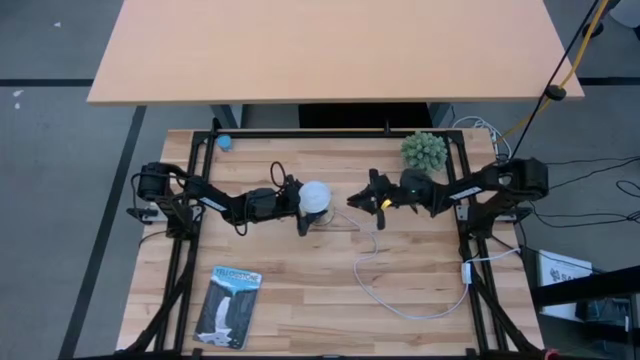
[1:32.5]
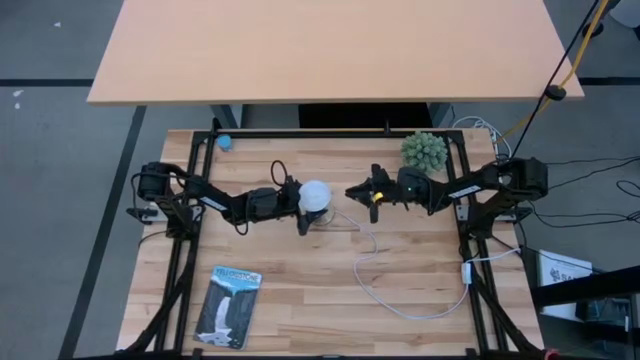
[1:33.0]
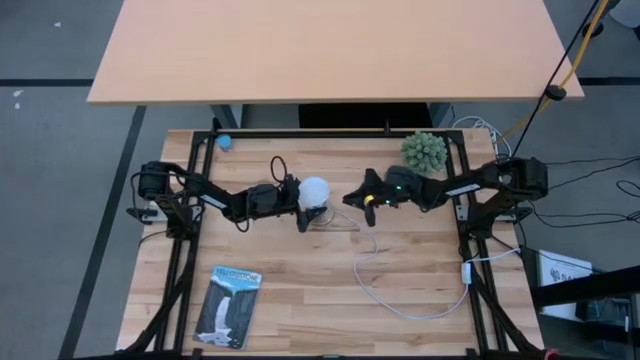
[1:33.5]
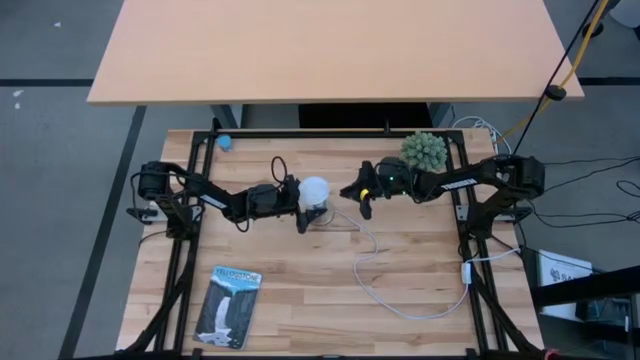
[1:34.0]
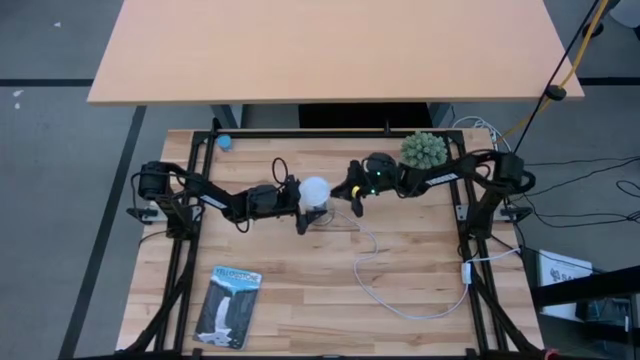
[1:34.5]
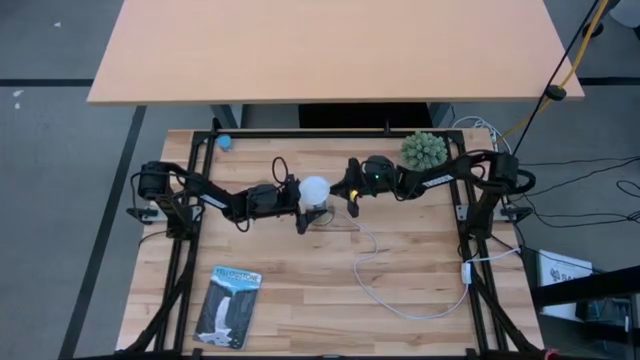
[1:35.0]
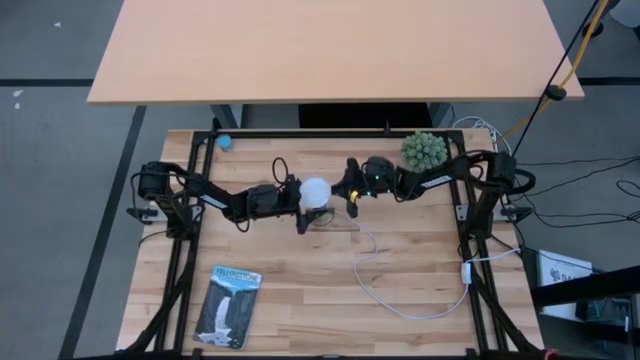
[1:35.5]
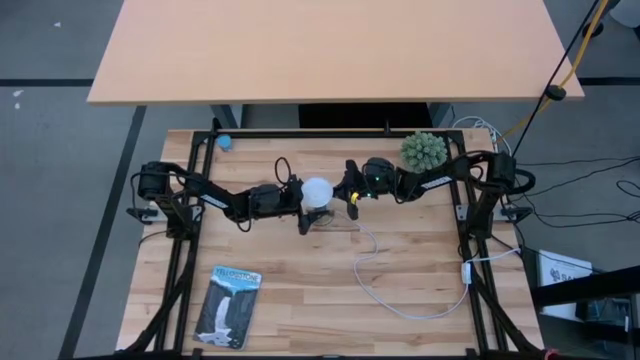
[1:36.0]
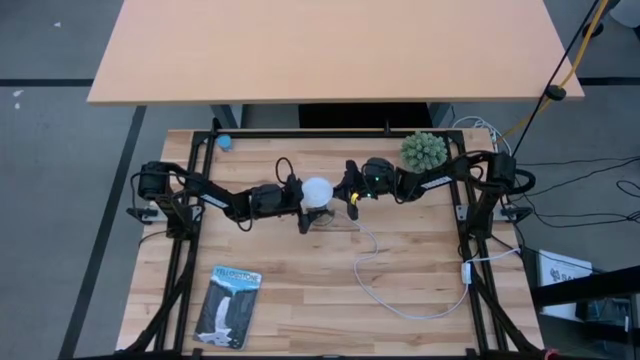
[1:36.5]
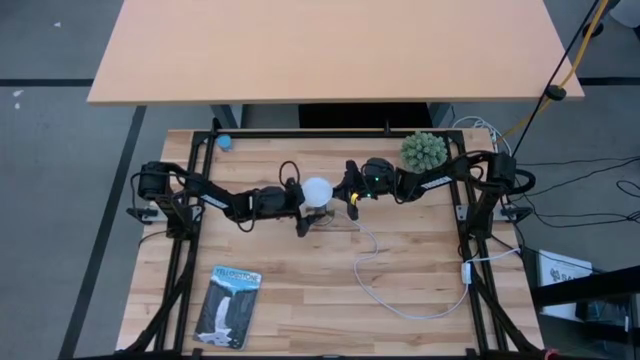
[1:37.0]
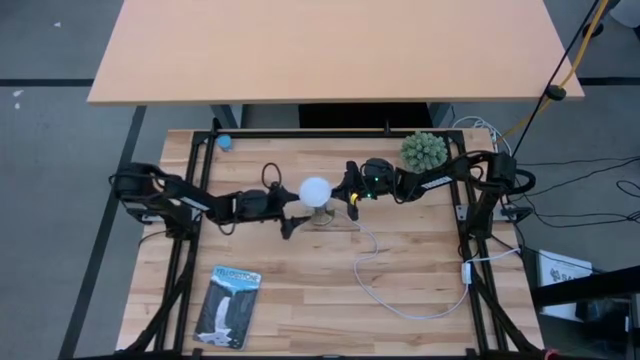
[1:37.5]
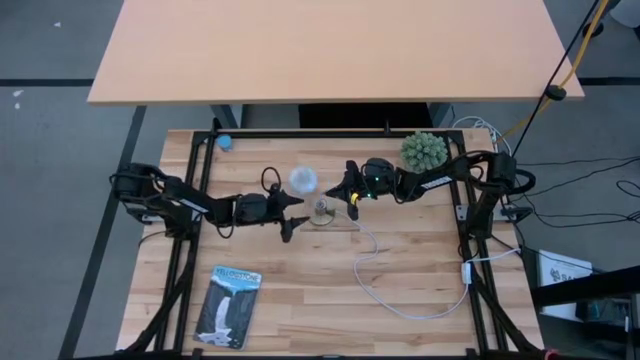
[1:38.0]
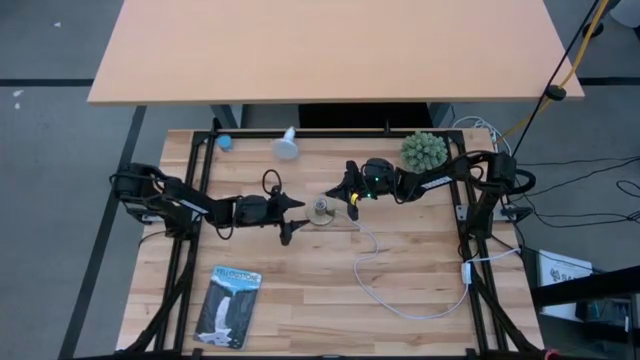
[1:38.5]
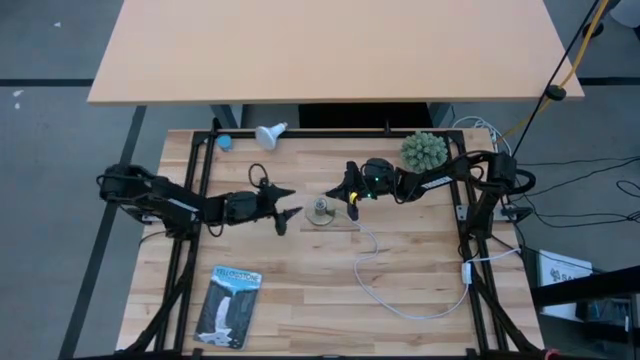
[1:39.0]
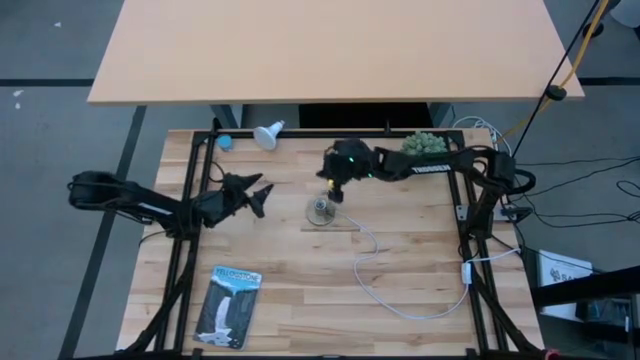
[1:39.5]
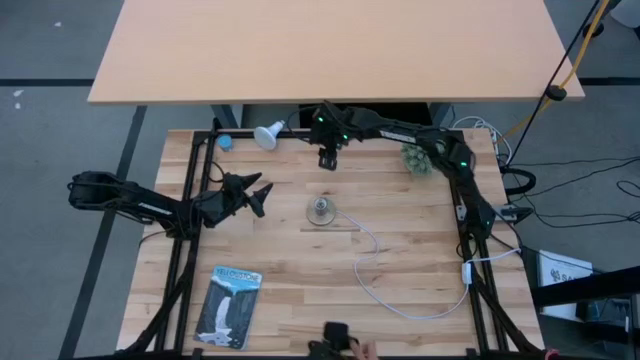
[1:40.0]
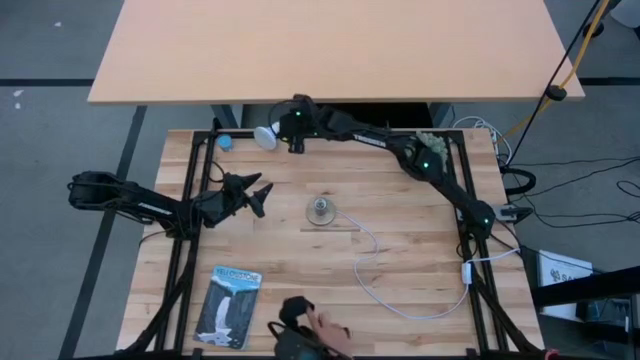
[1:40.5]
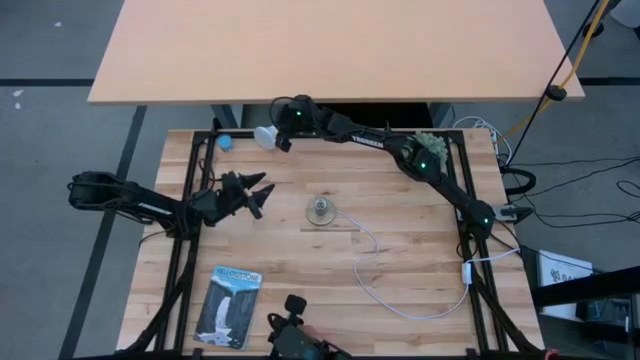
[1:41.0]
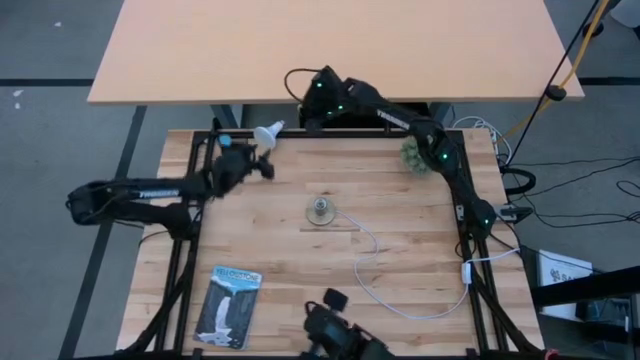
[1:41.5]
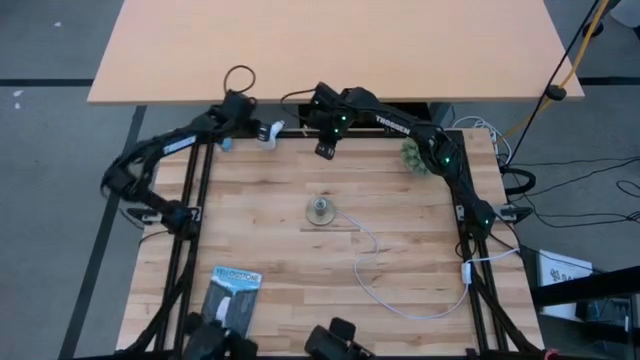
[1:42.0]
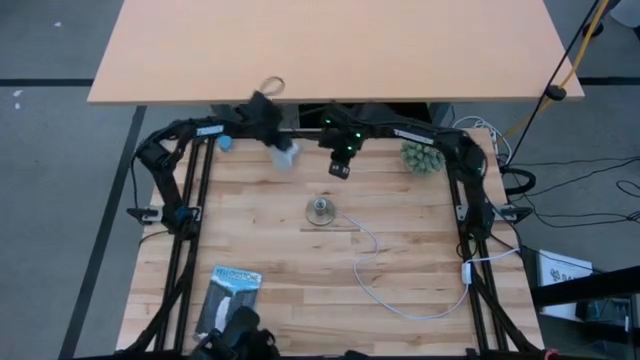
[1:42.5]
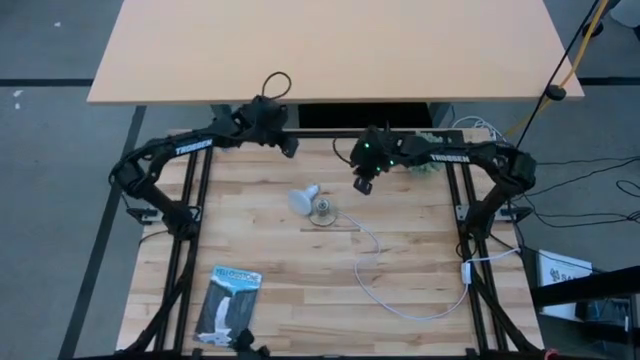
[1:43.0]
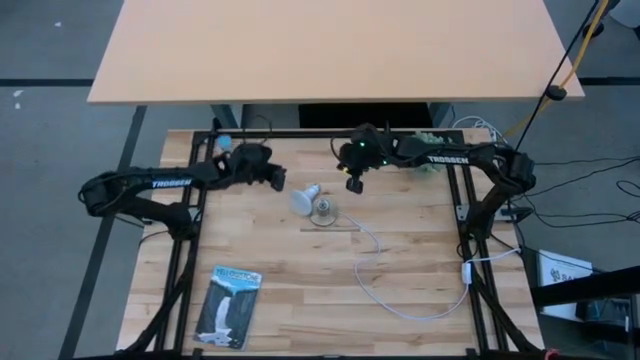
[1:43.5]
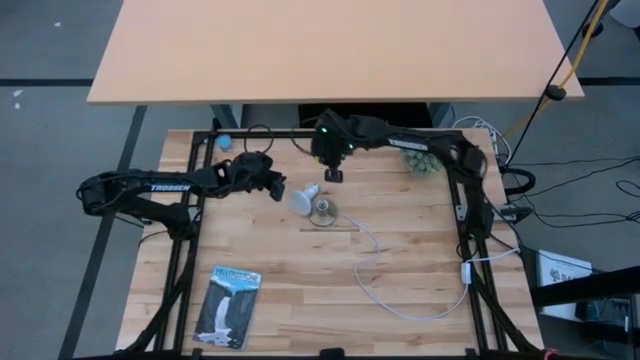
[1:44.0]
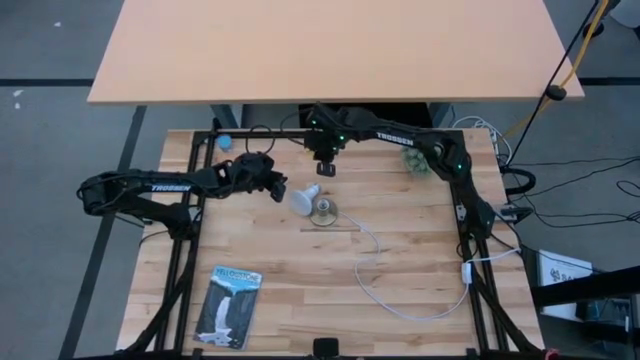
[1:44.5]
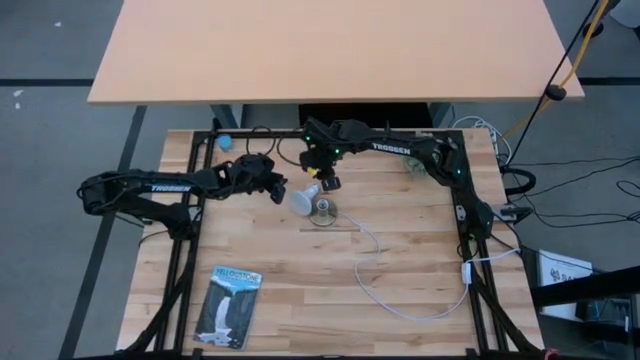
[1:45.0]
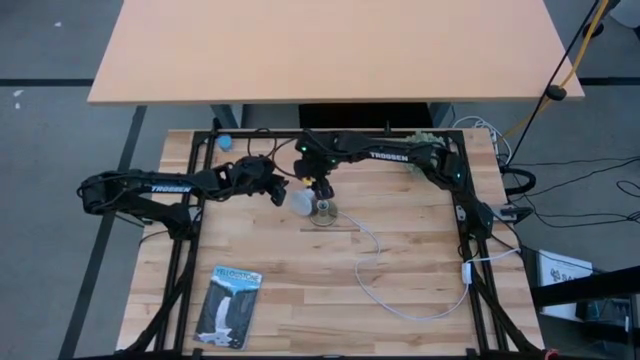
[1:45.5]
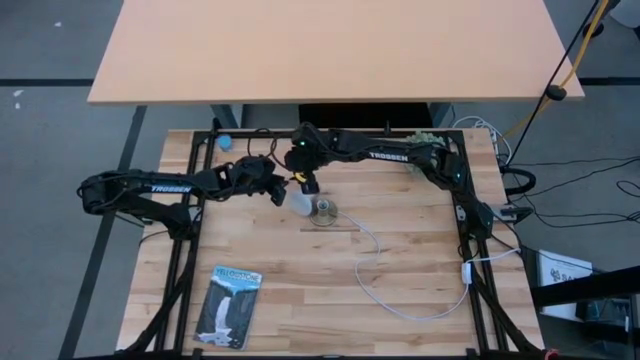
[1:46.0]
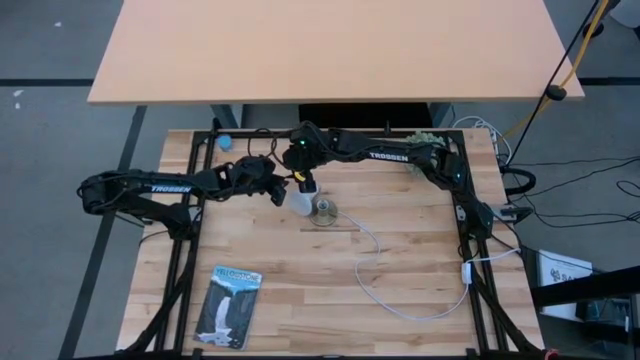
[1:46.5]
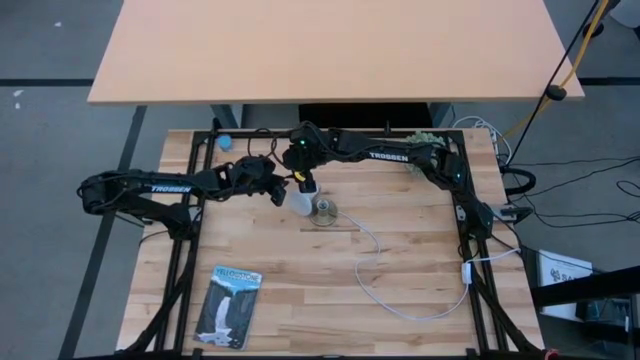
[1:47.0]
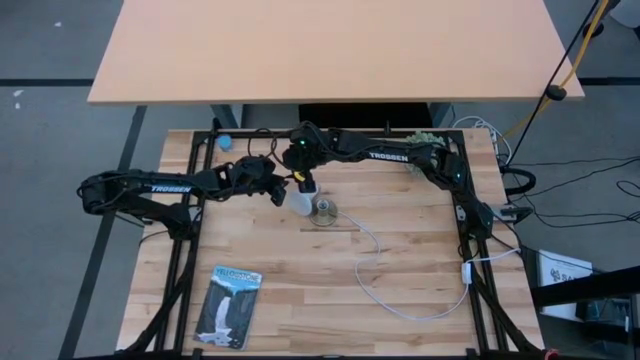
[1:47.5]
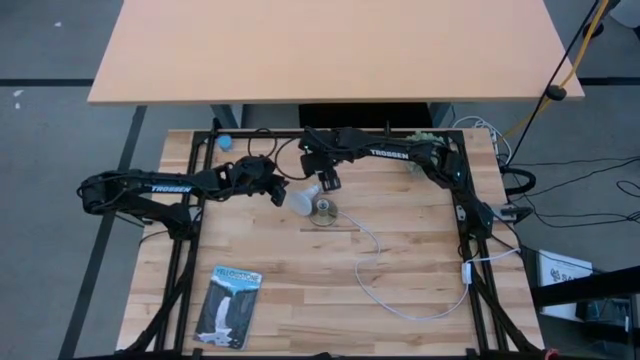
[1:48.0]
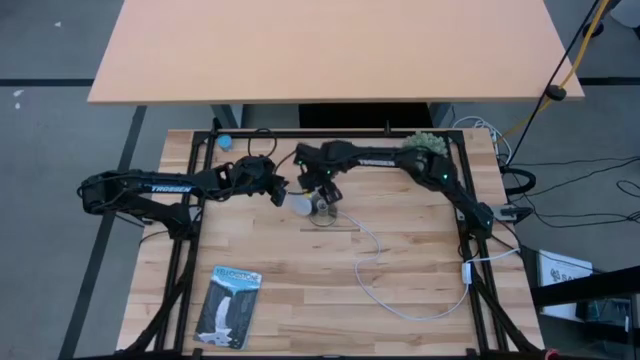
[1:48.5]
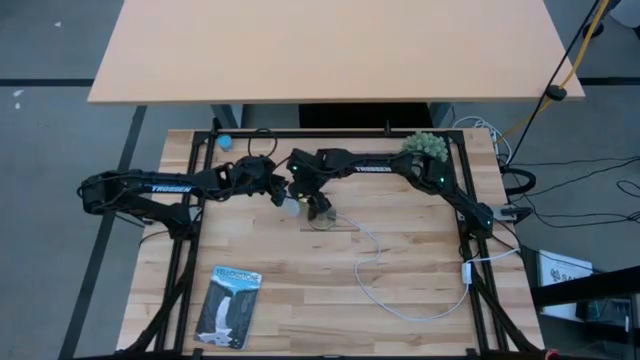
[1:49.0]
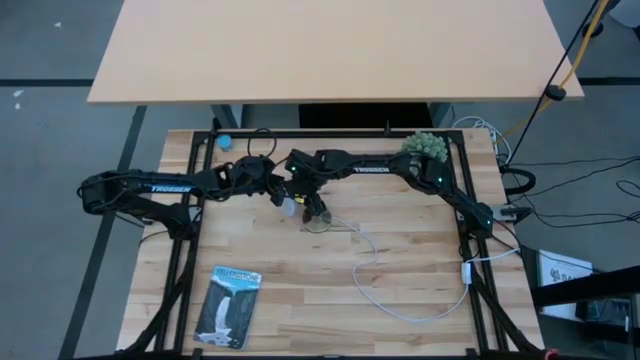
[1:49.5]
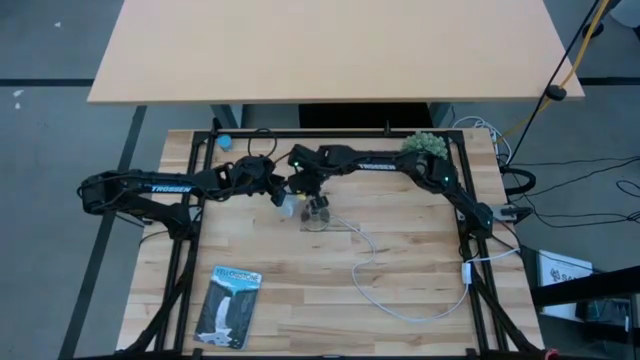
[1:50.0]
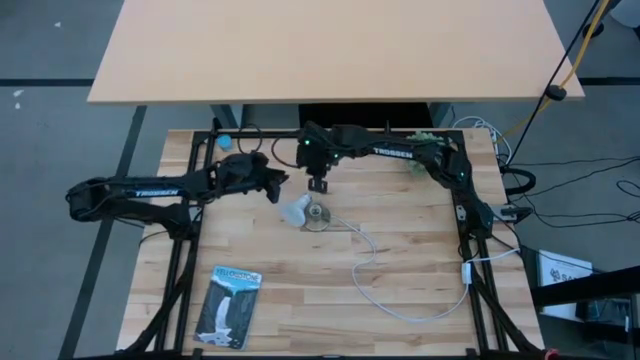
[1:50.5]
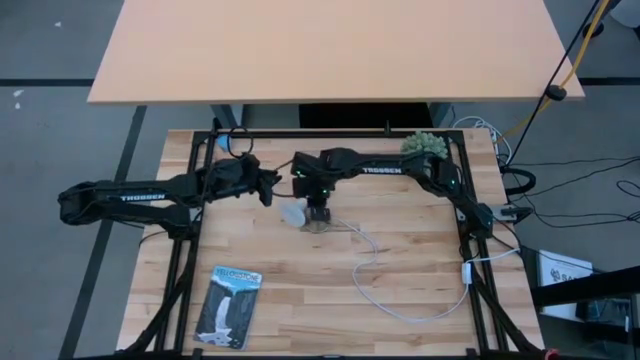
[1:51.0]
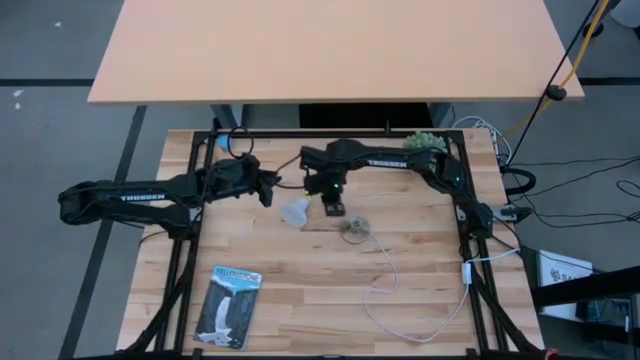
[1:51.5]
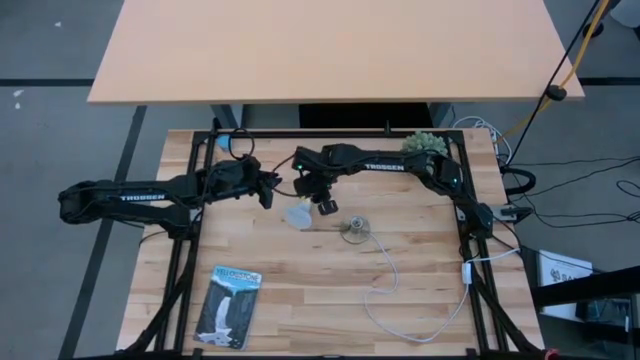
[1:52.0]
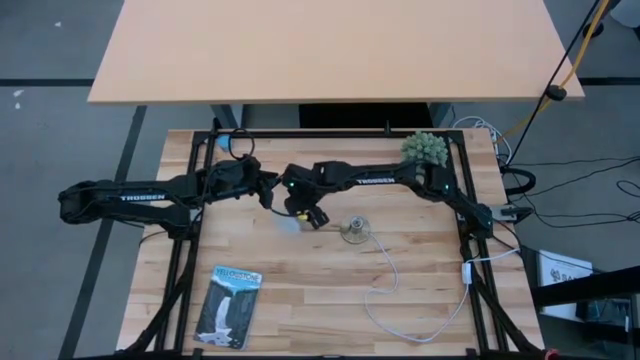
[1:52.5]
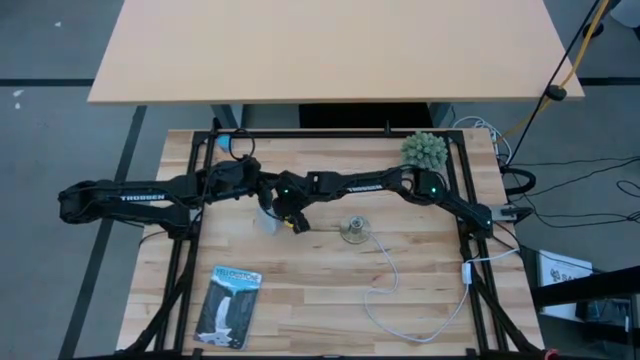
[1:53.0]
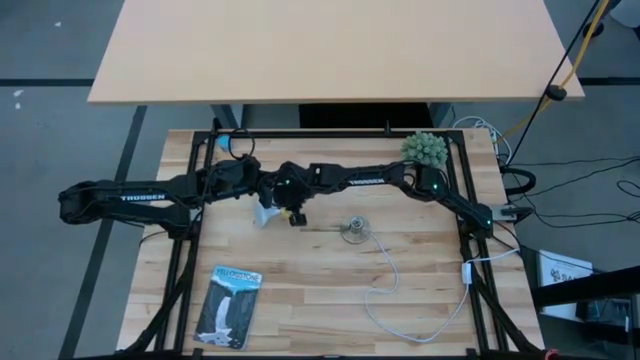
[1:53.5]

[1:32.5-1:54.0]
Task: Screw lightbulb
Insert the lightbulb into the lamp
